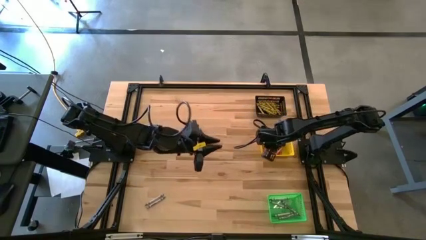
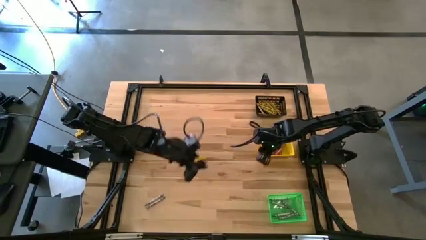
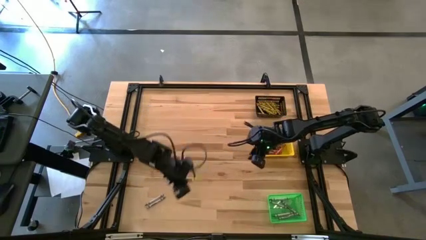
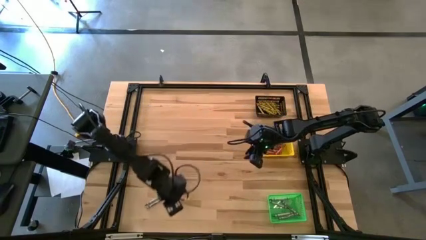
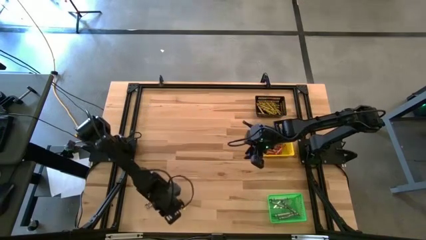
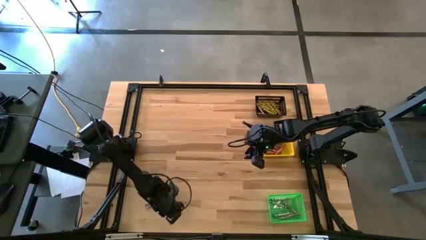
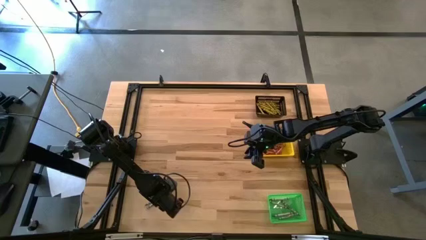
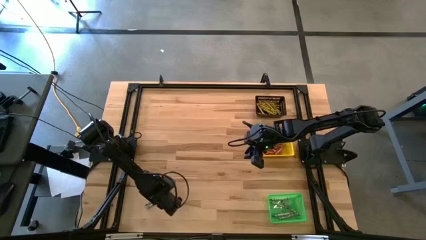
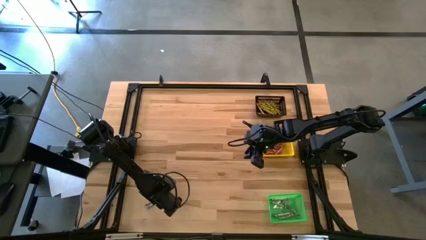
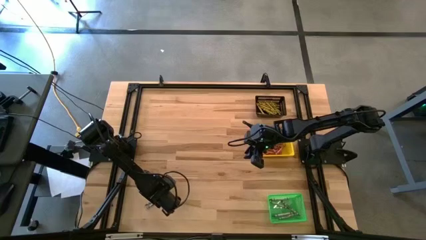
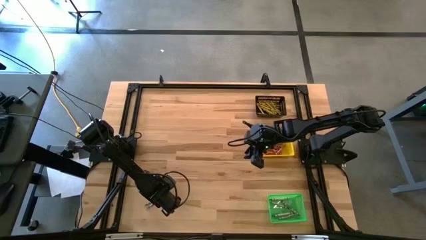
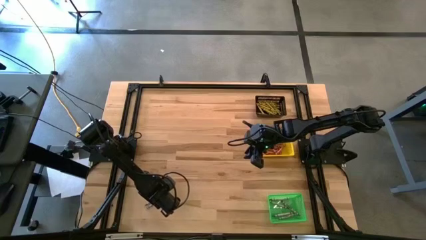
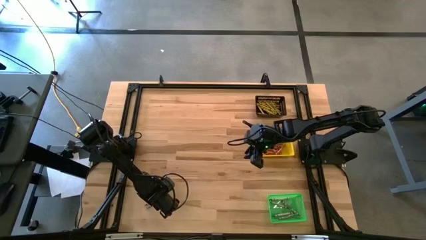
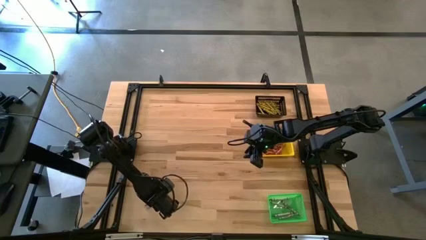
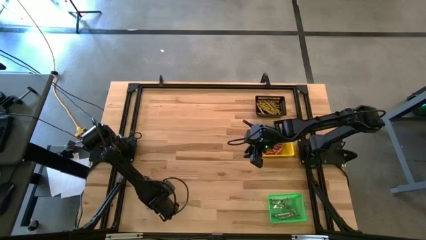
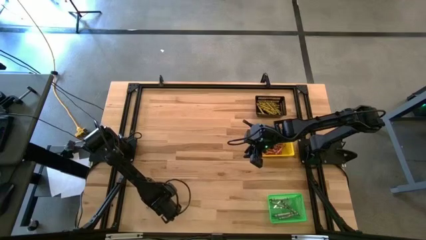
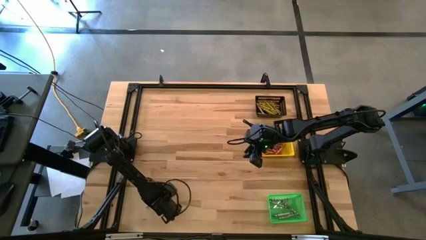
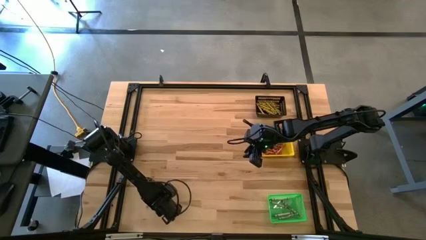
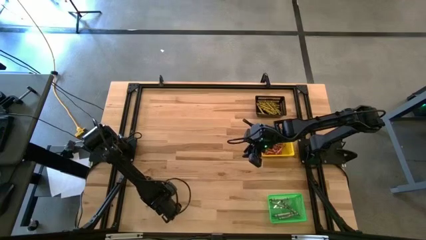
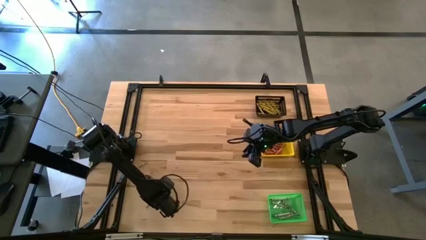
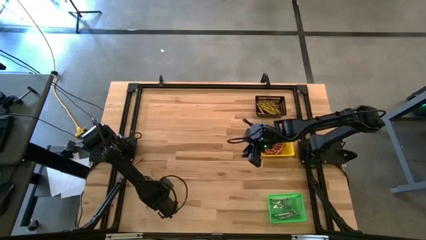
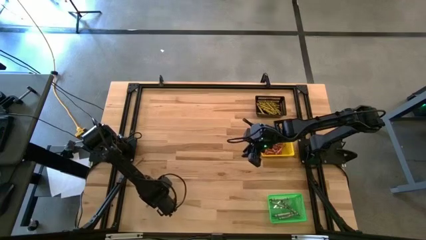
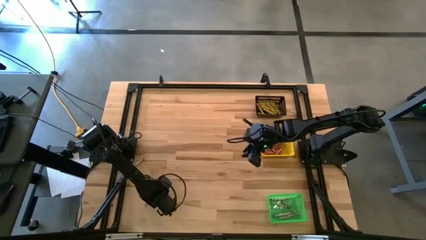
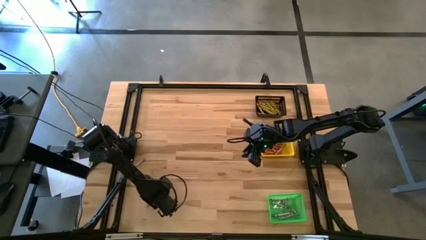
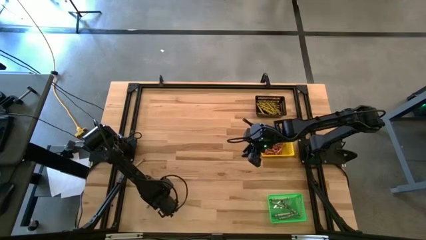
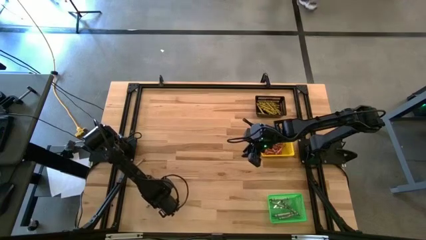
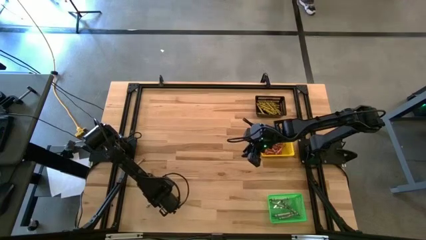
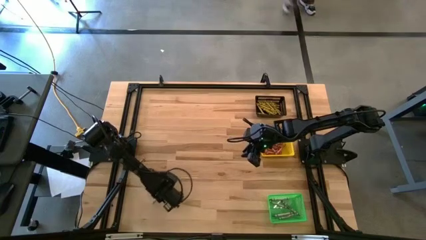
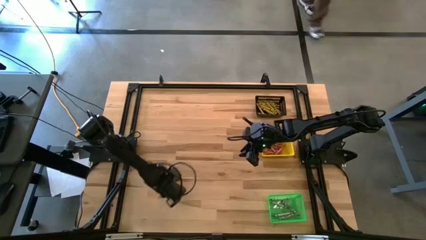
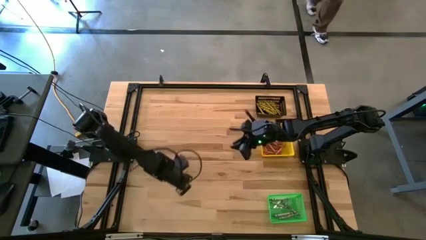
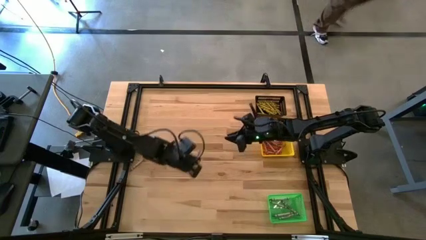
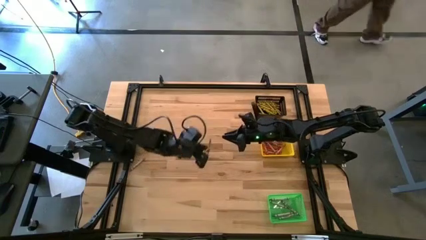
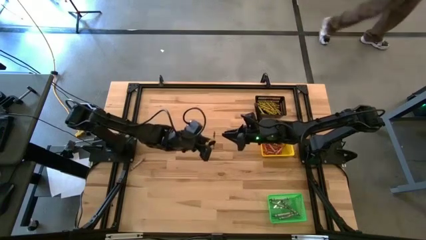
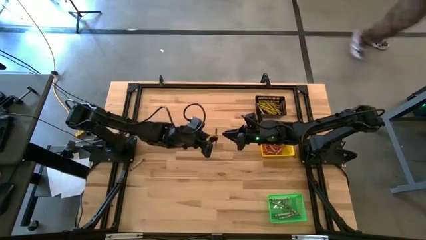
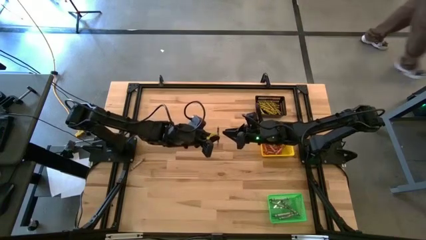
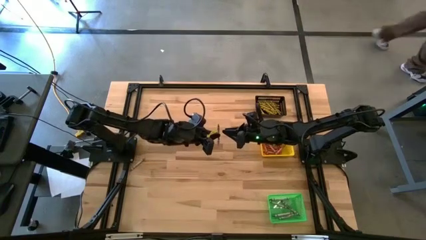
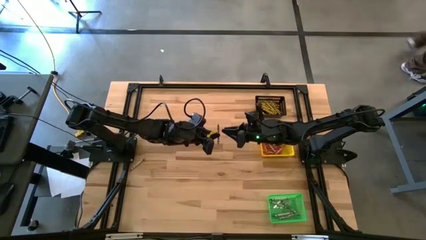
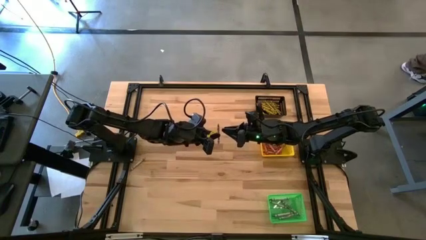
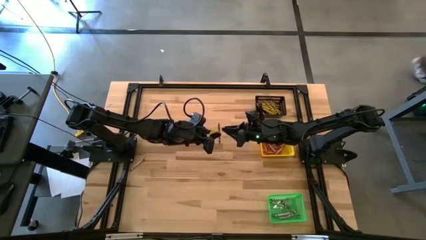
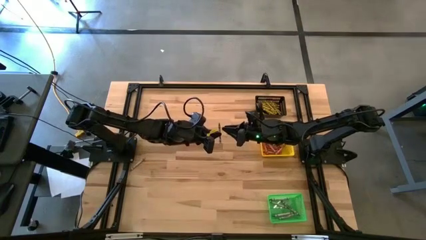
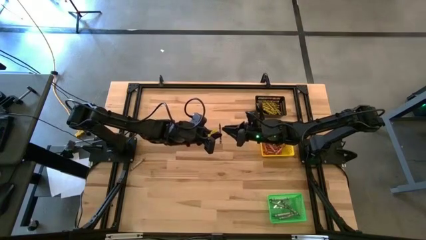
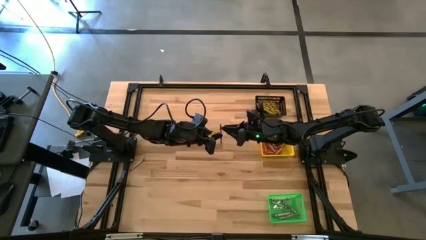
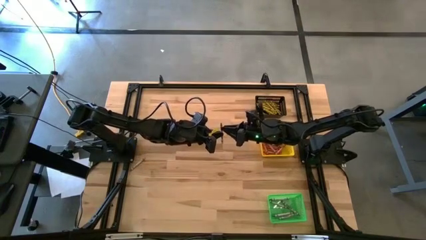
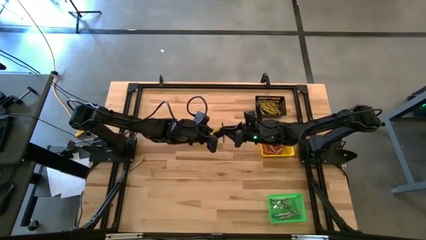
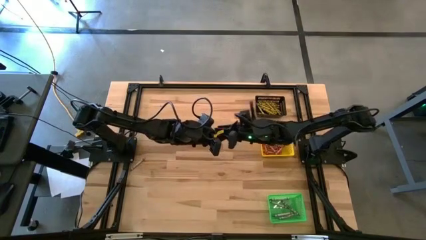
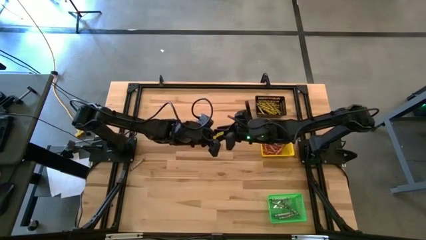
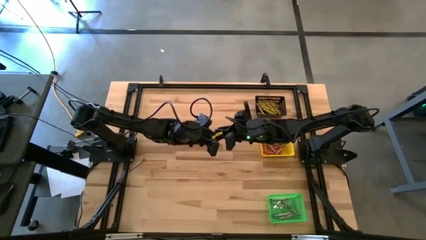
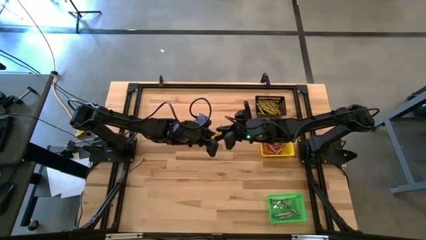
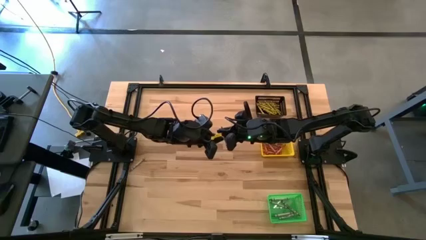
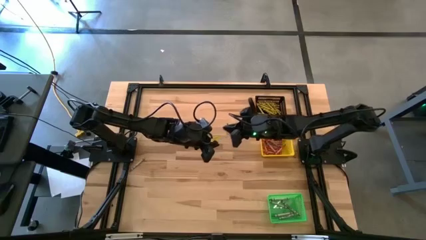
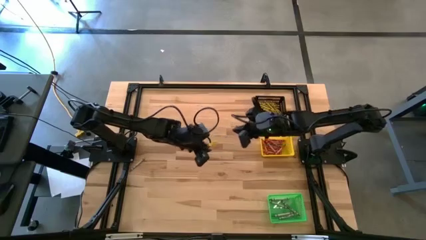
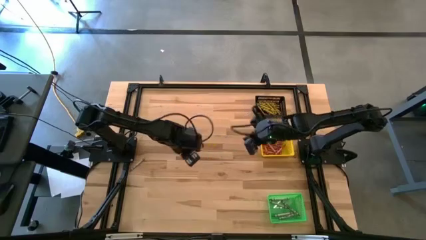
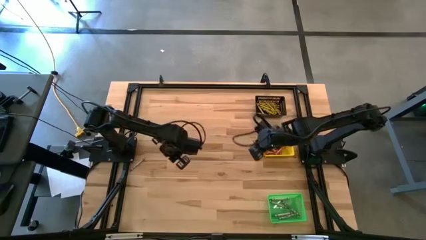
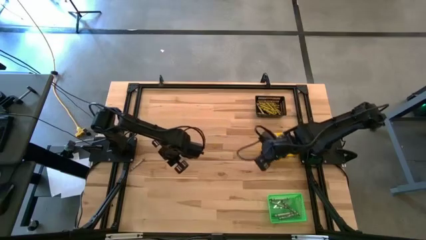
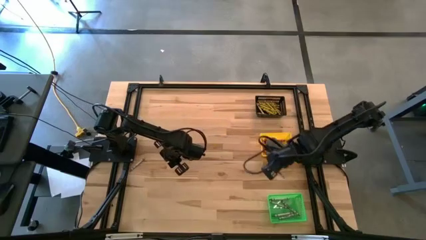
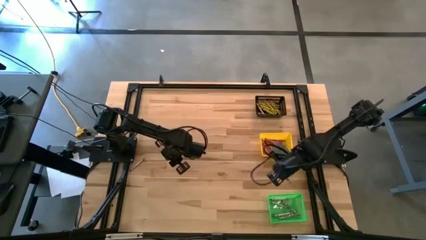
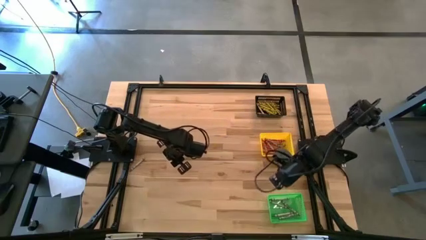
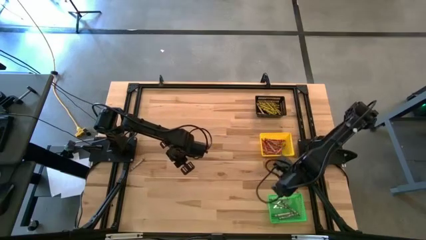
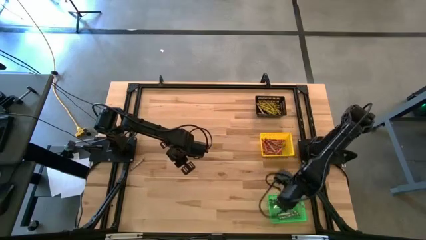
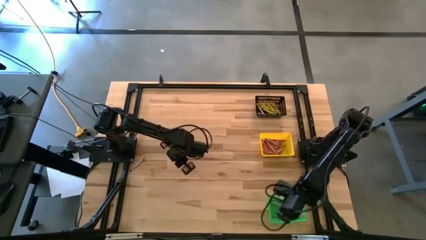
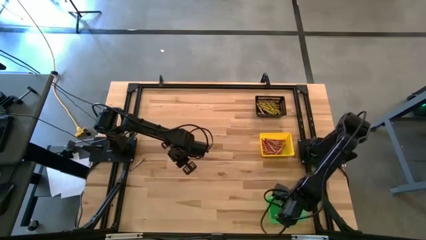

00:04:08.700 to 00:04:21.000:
Task: Sort crayons
Put the gray crayon into the green bin

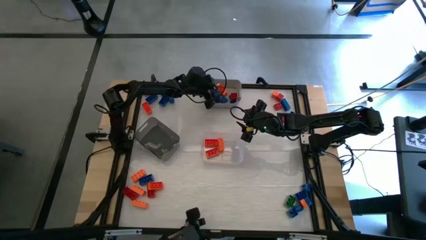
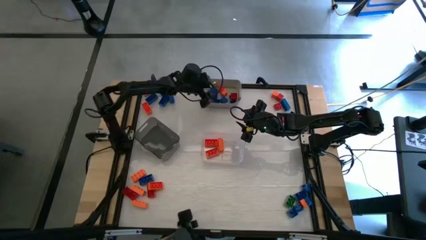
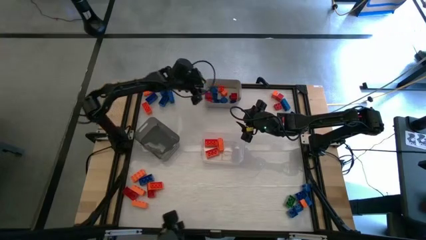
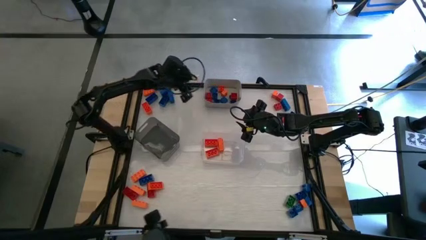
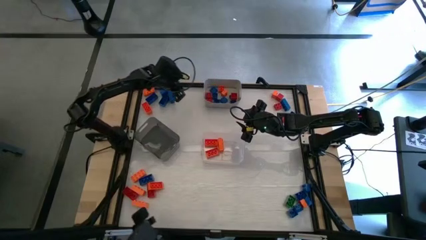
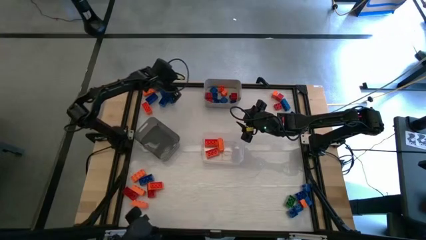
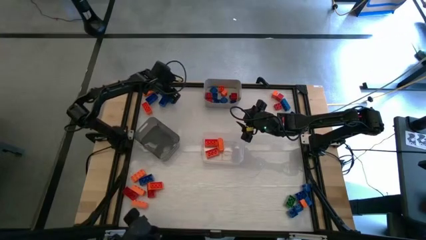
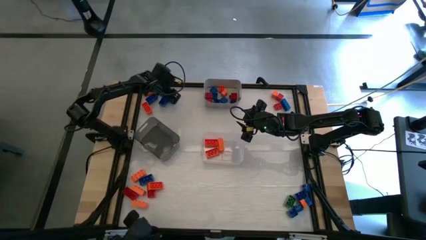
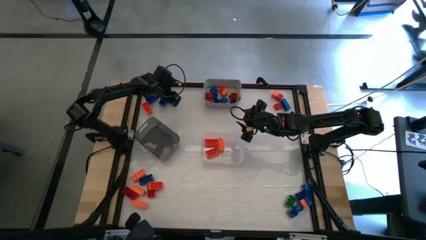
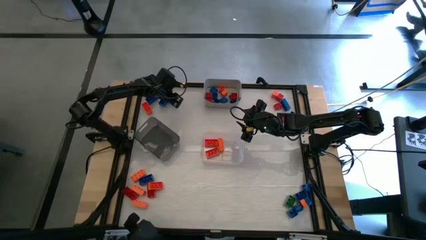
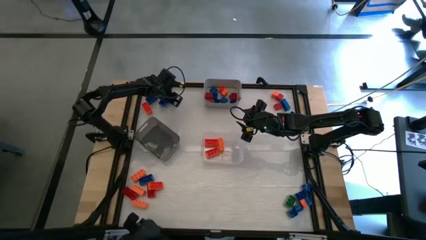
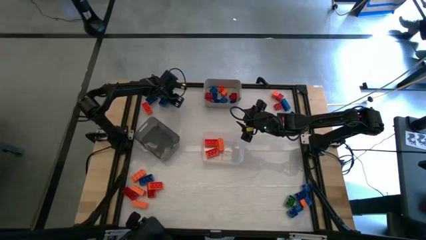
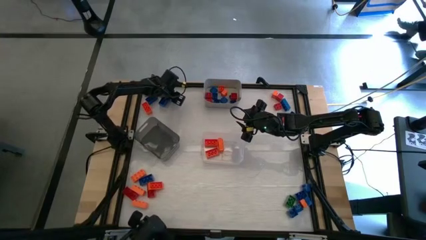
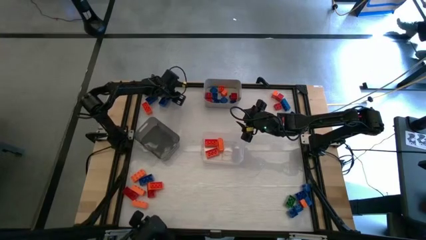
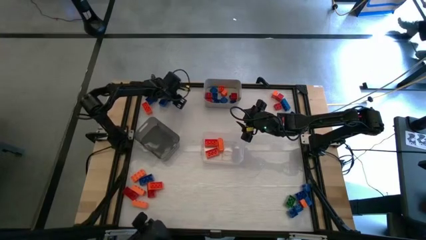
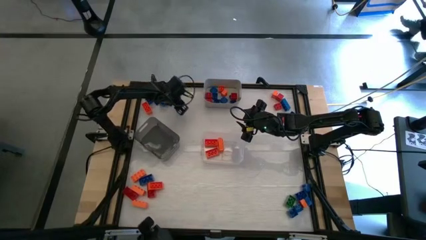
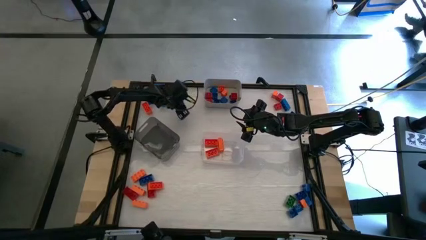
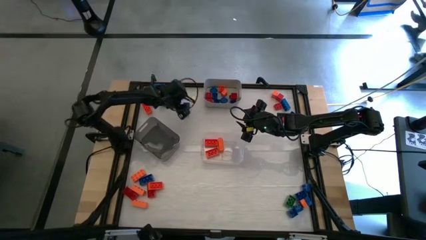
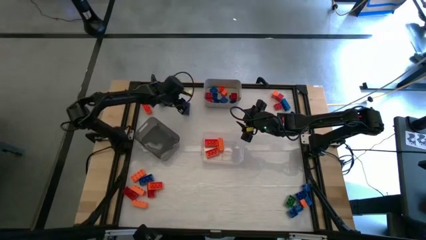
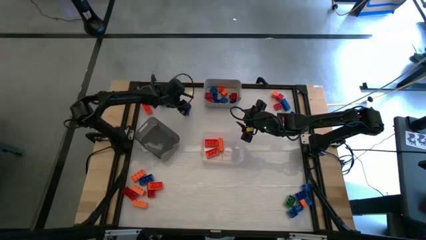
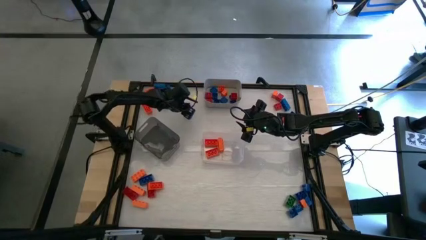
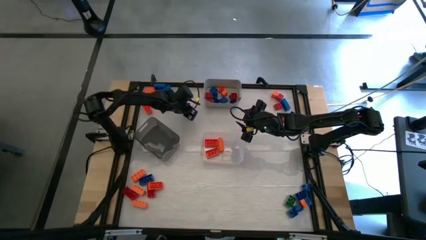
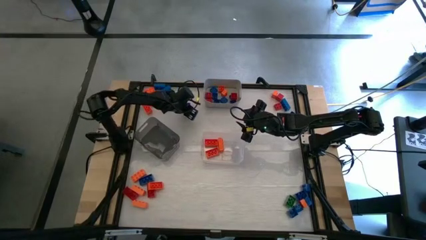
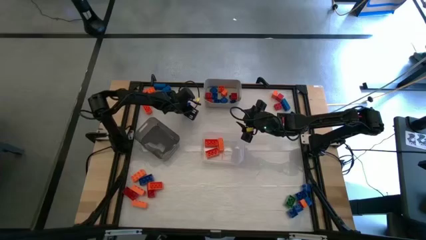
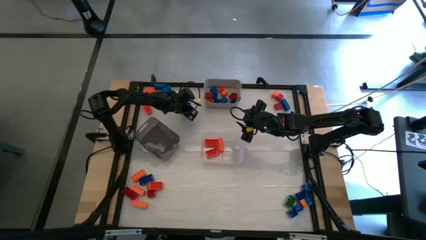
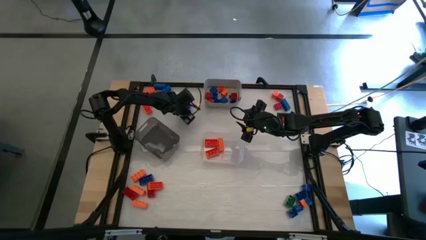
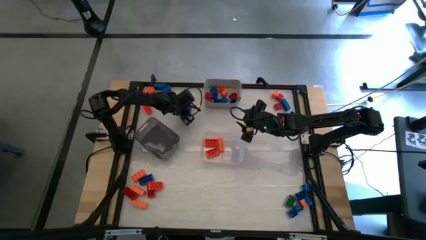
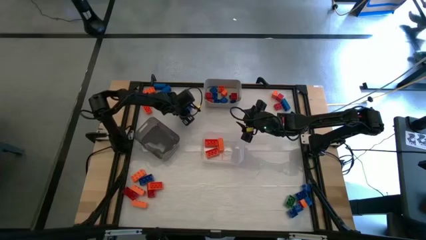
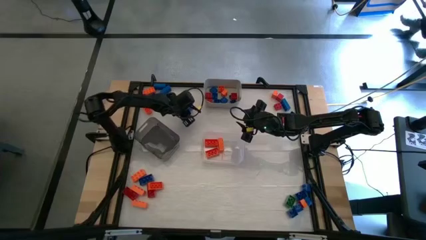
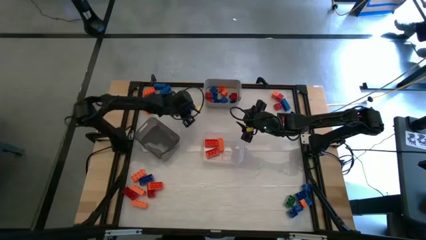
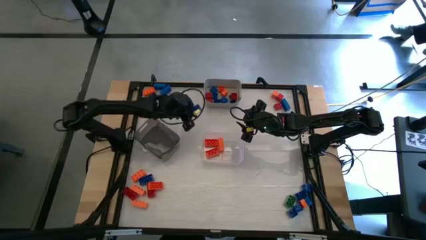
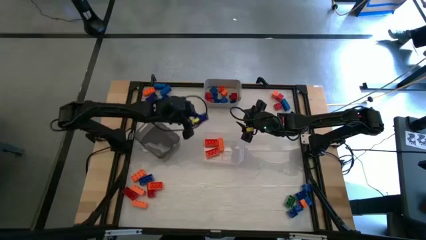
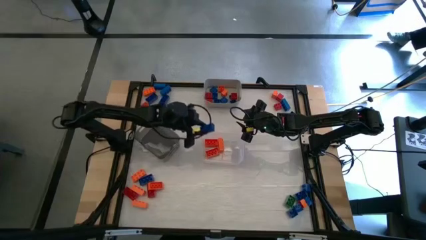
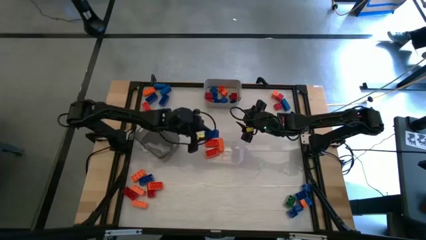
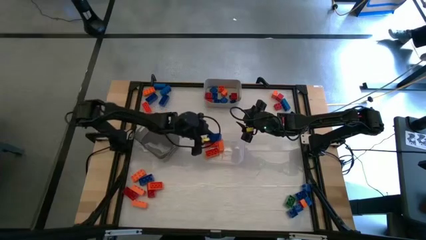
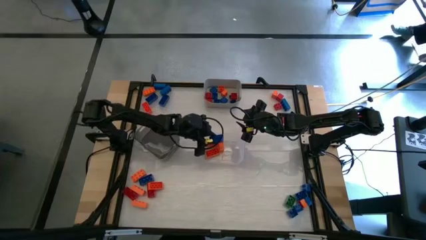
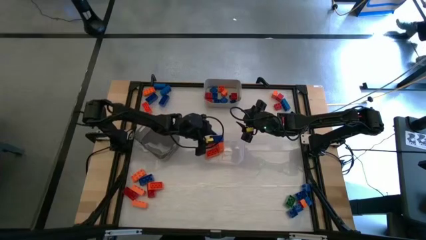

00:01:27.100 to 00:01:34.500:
Task: Sort blocks by size
Put the big blue game piece into the transparent bin
